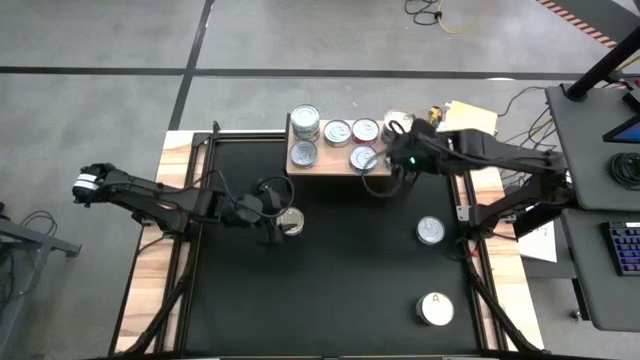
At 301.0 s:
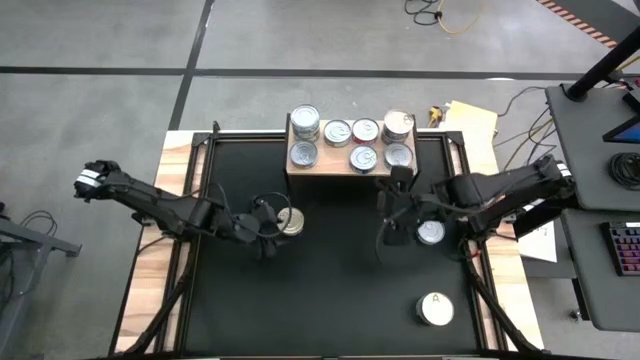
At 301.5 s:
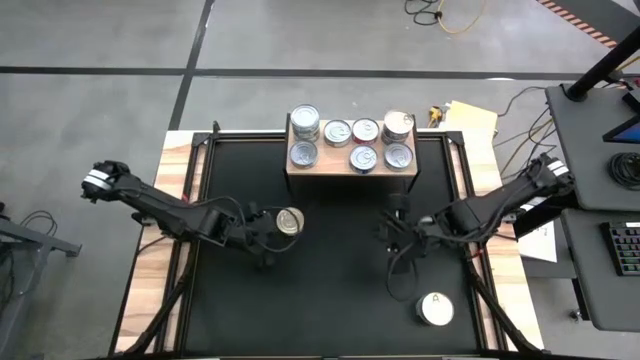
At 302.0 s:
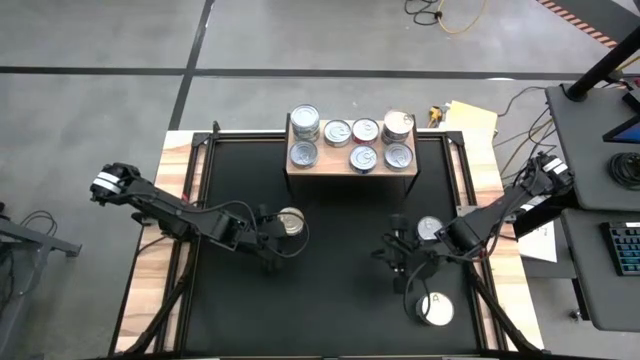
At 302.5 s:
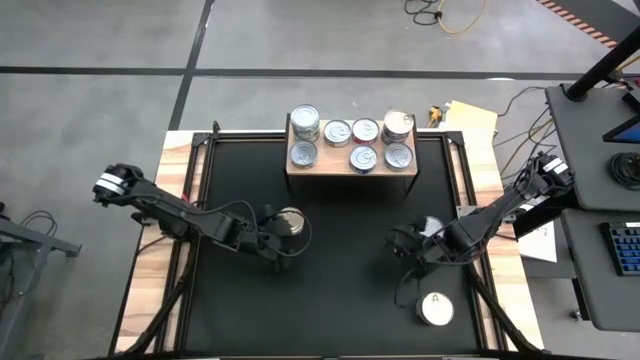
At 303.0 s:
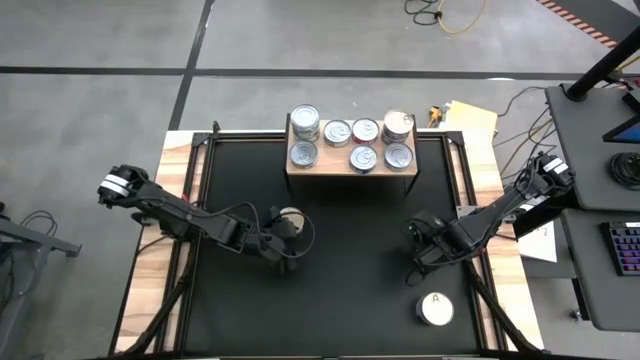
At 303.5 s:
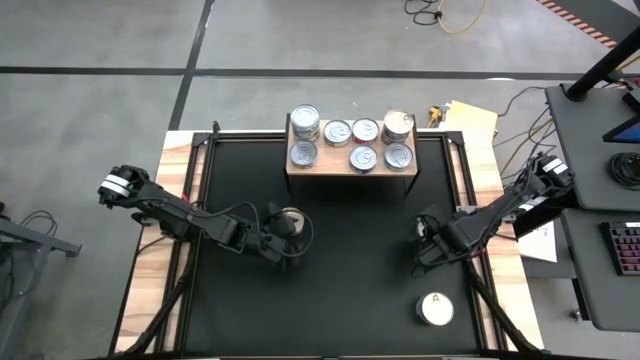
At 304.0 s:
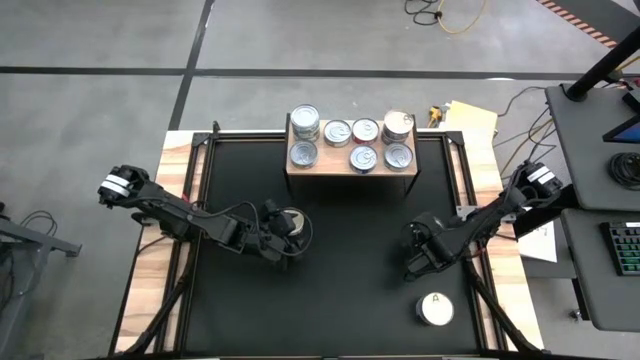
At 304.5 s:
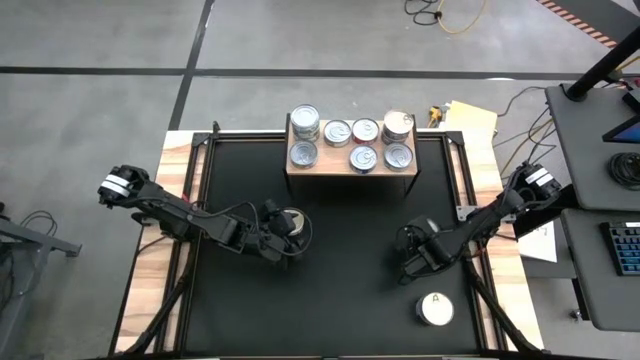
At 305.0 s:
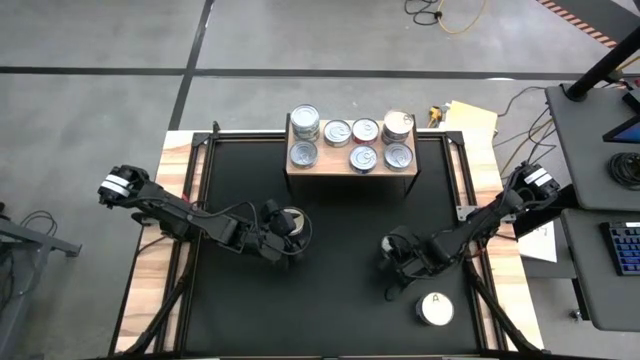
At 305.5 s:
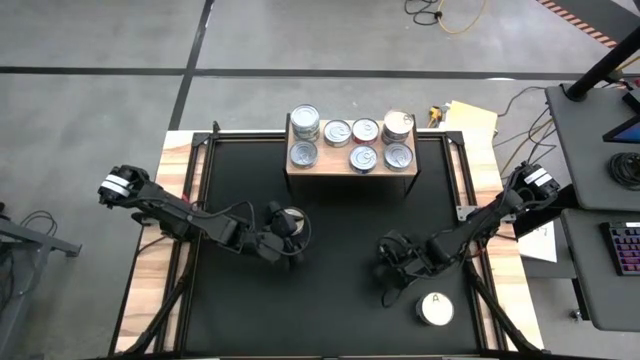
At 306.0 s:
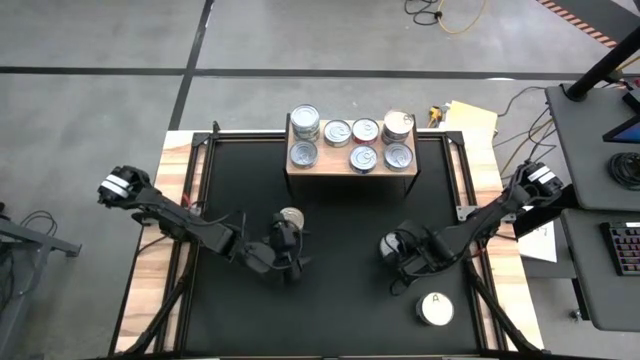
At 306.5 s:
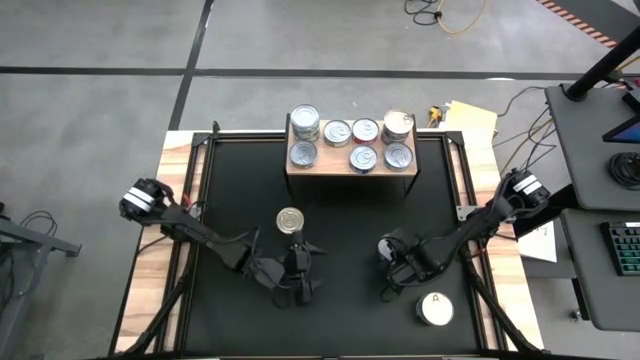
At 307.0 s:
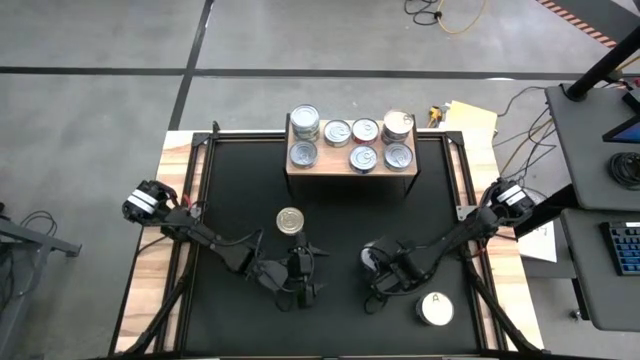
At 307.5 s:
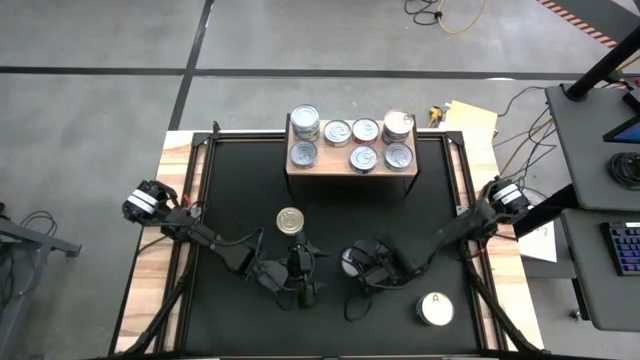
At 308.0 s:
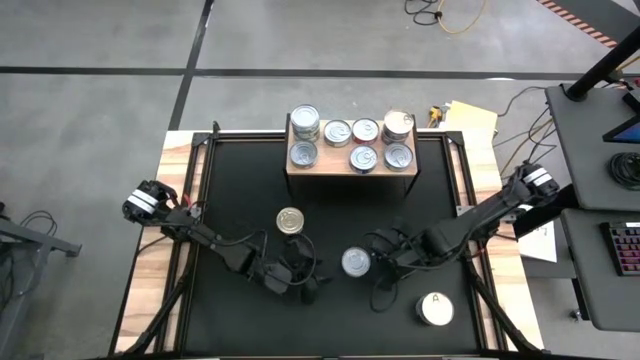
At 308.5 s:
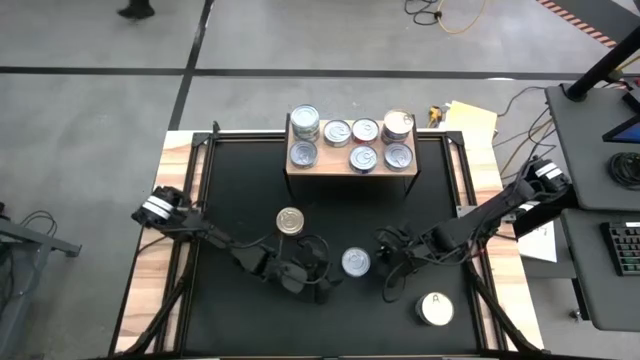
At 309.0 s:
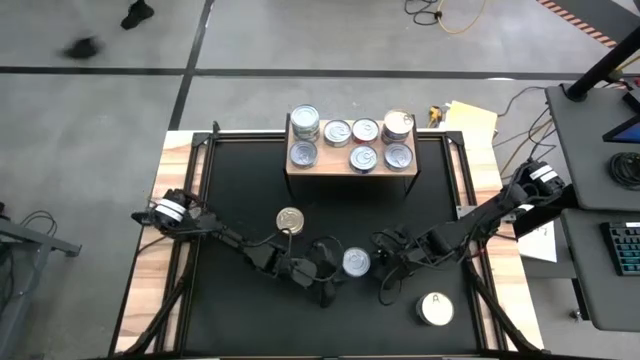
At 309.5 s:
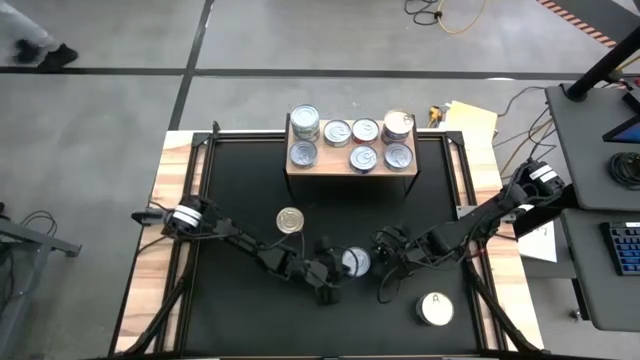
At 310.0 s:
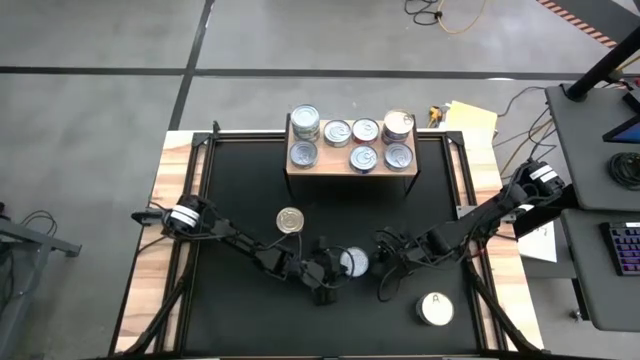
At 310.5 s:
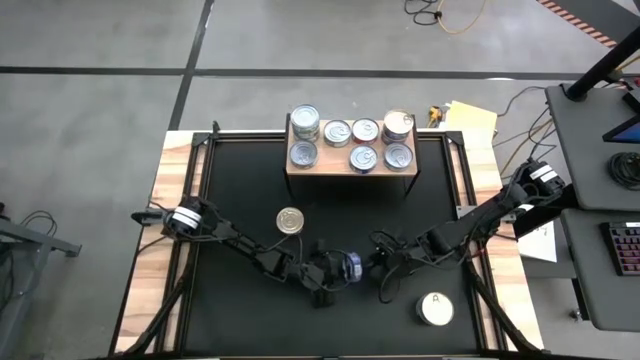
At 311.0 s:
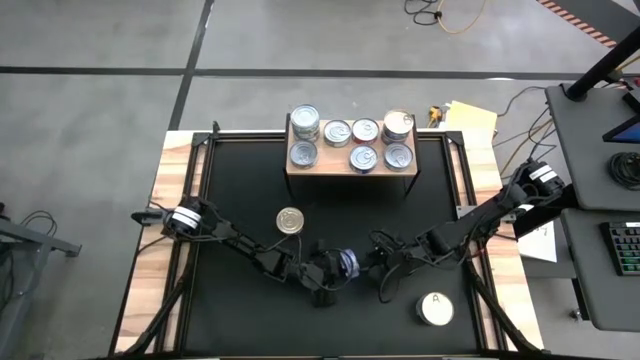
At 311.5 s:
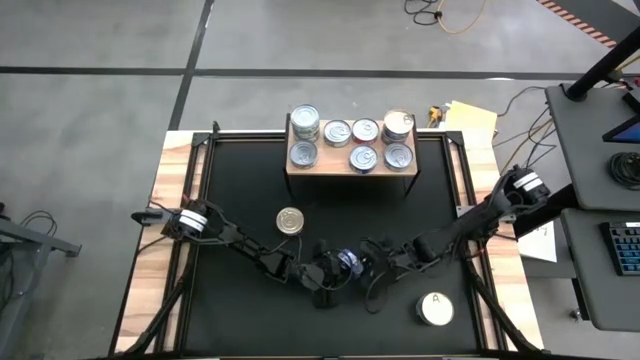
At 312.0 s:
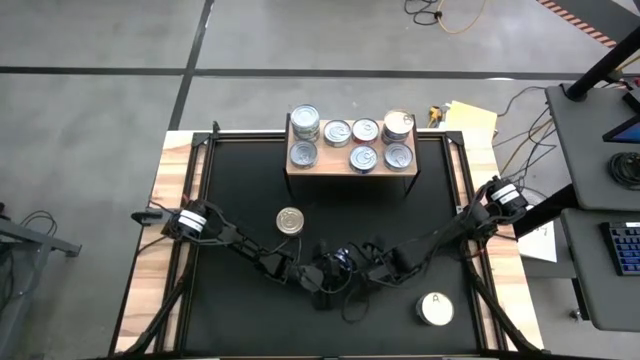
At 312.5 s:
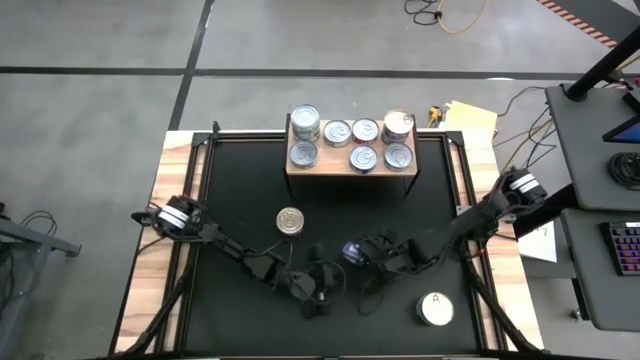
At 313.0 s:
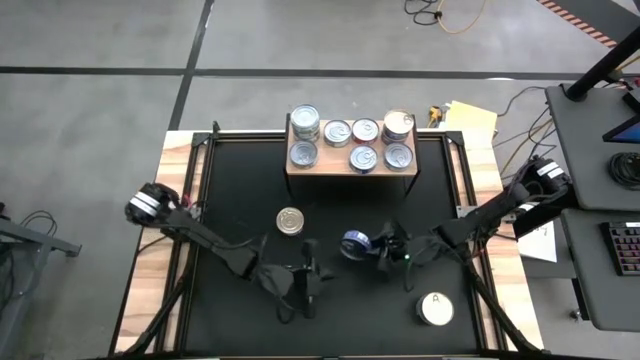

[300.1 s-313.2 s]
Task: Stack canned seafood by type on shelf
Stack the blue tuna can on top of the blue tuna can on the shelf

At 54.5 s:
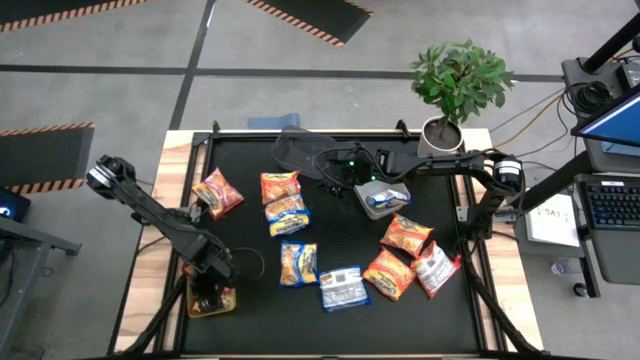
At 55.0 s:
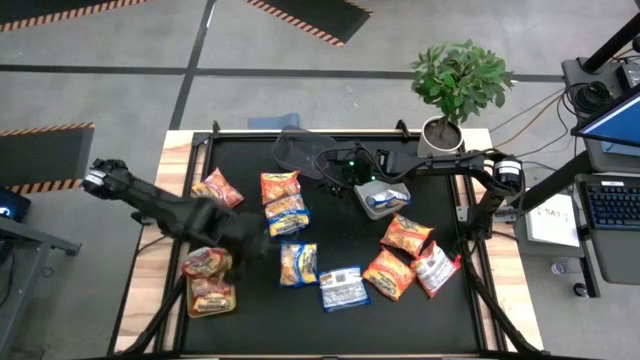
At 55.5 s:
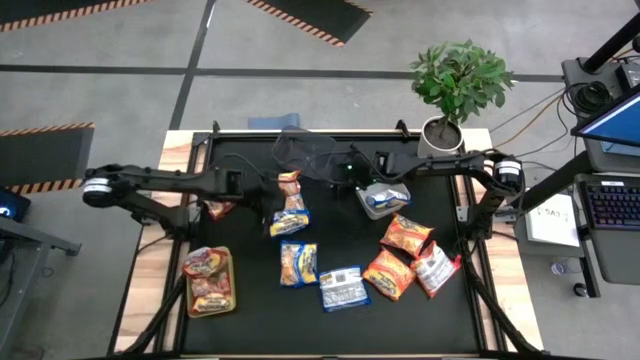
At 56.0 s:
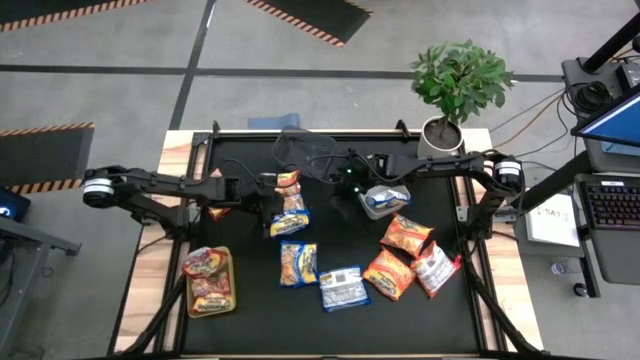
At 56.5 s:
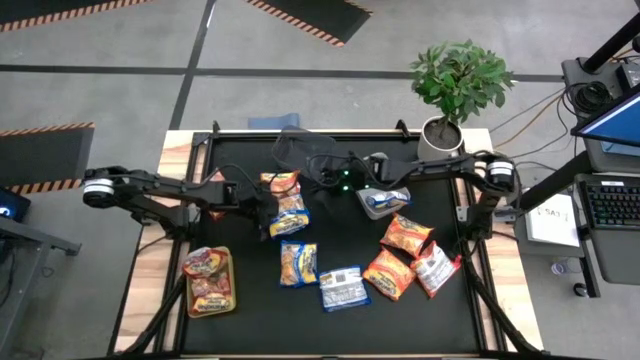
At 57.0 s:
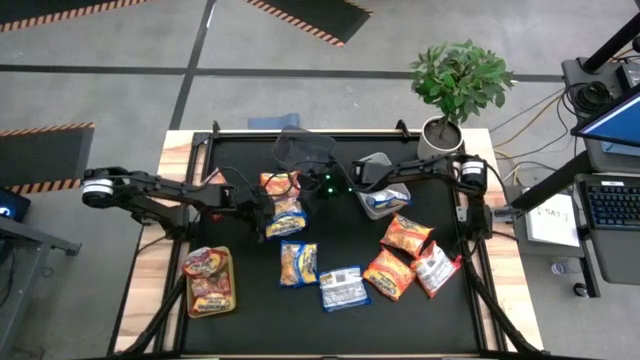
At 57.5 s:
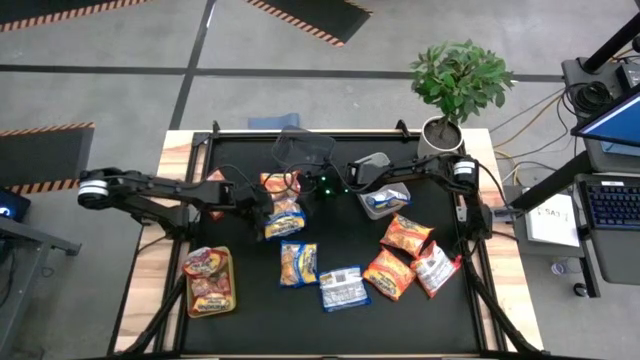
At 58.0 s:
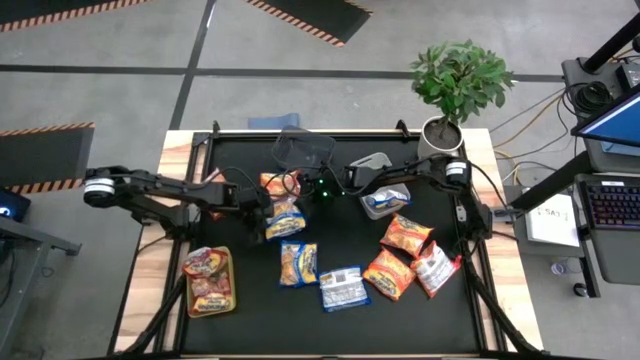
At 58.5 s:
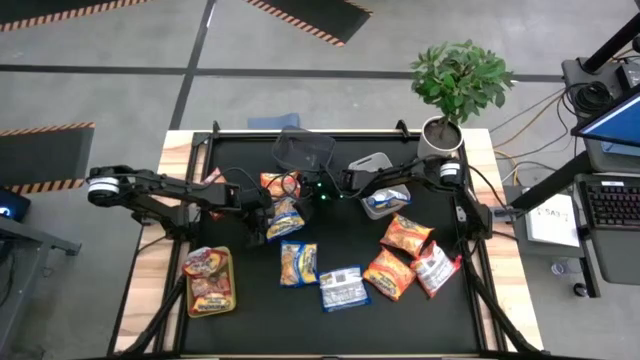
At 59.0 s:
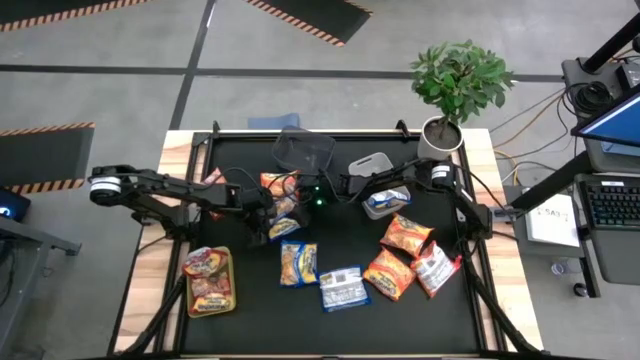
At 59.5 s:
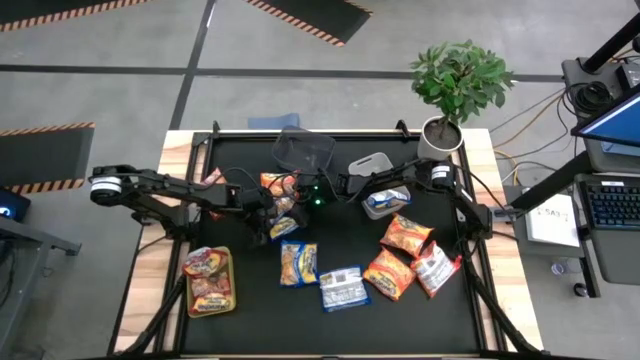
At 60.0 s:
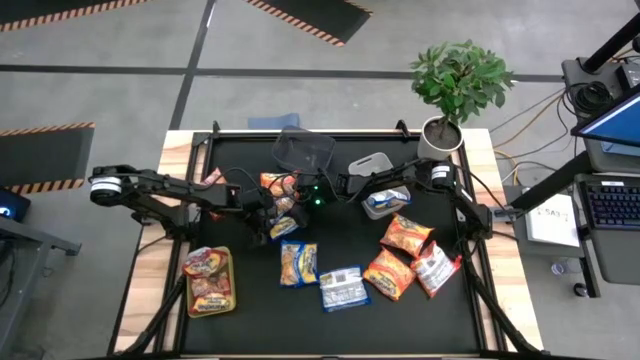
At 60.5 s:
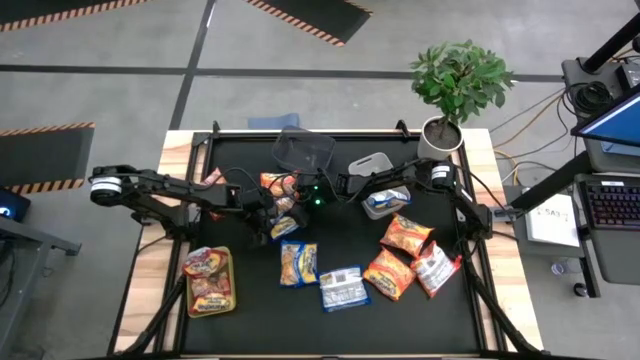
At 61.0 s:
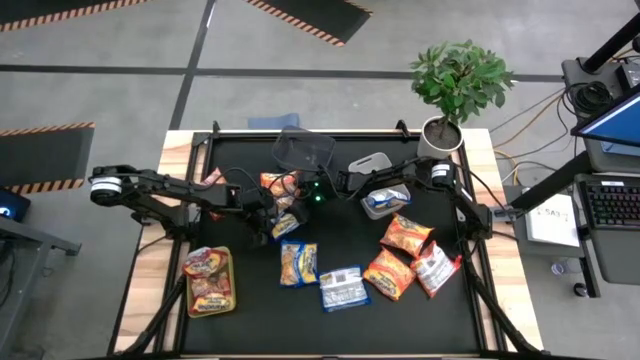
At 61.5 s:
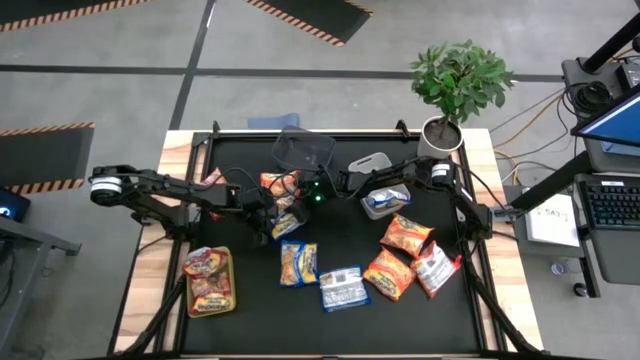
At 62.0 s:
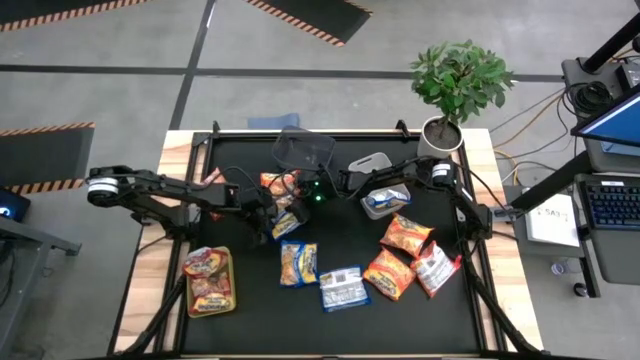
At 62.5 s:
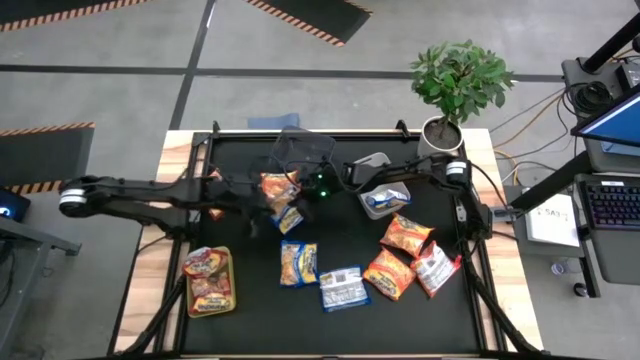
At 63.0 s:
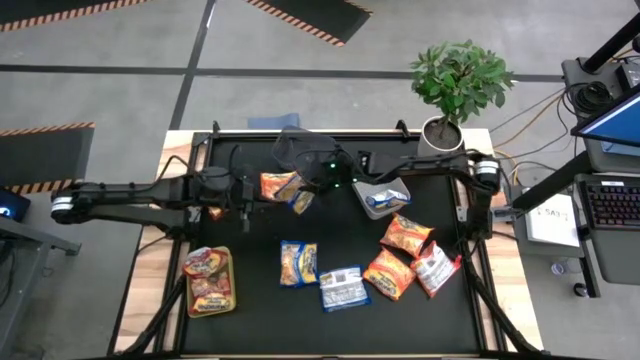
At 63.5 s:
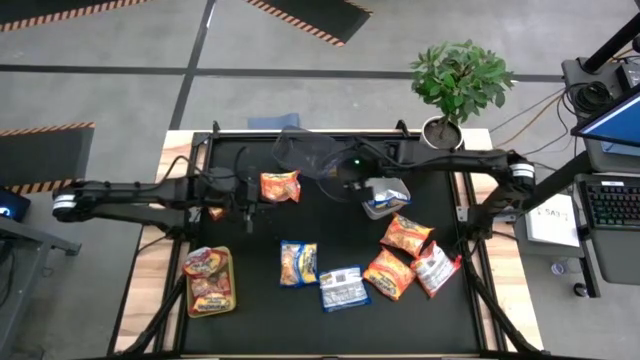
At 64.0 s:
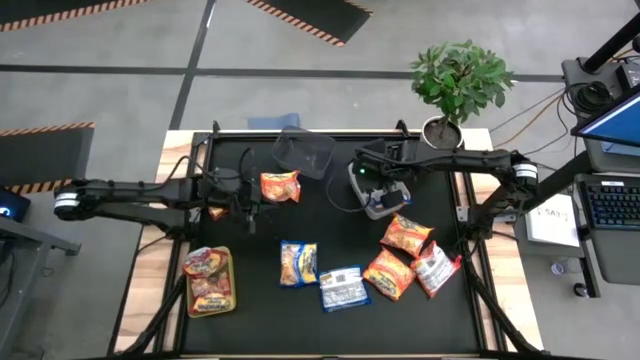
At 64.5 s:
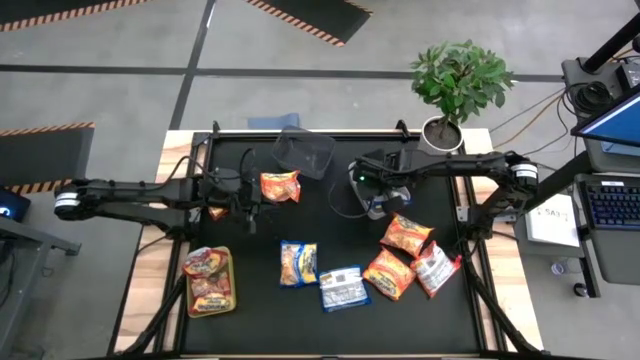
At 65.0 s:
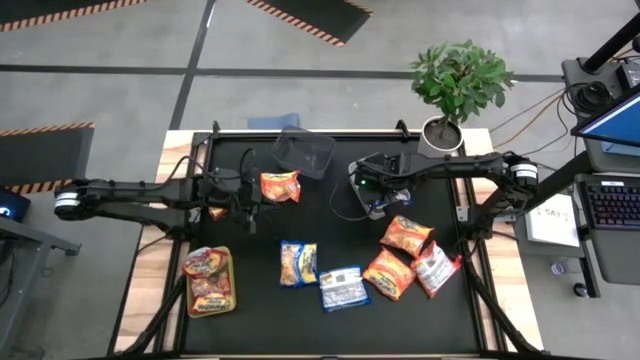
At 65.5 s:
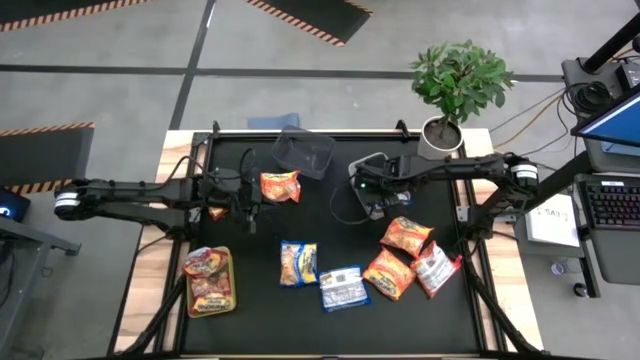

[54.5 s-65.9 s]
Task: Sort Maruchan noodles
Put the blue noodle pack into the white bin
